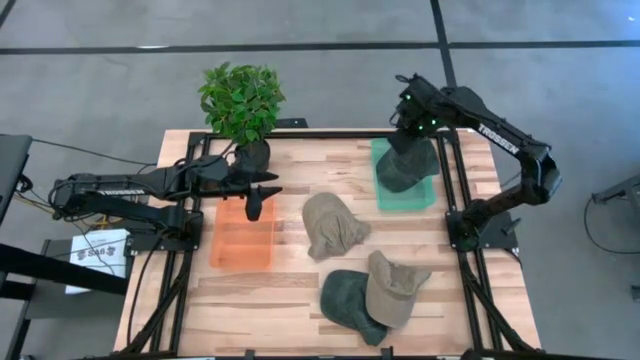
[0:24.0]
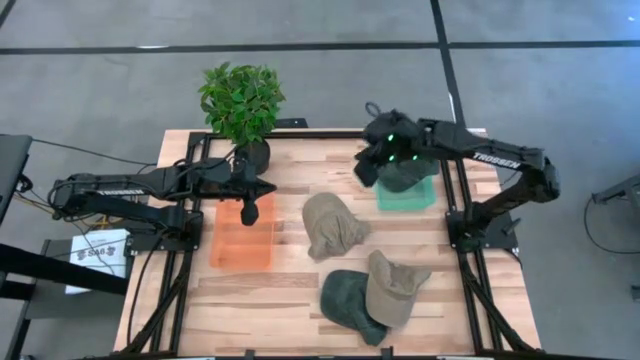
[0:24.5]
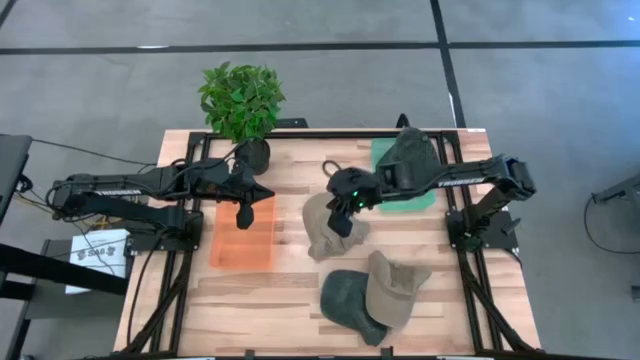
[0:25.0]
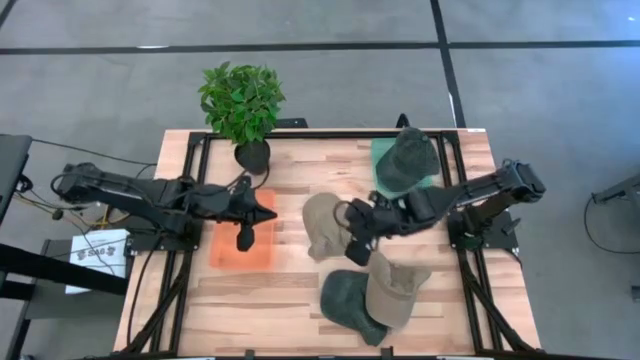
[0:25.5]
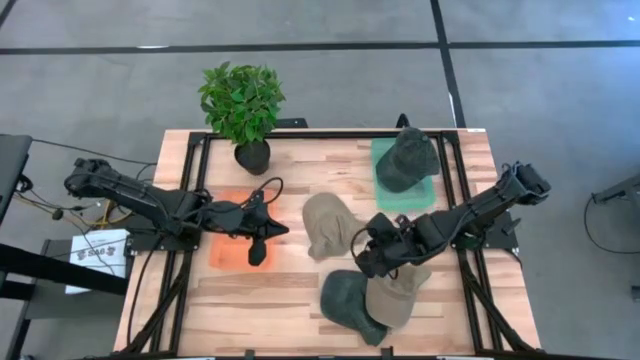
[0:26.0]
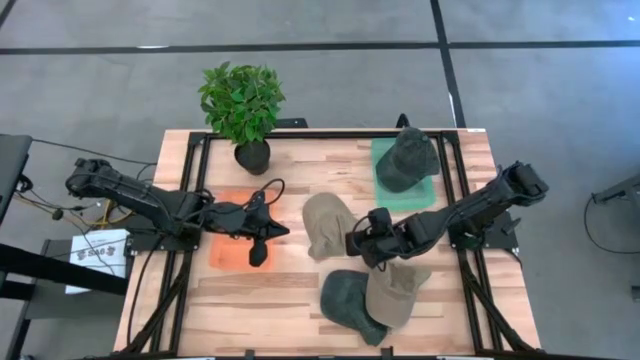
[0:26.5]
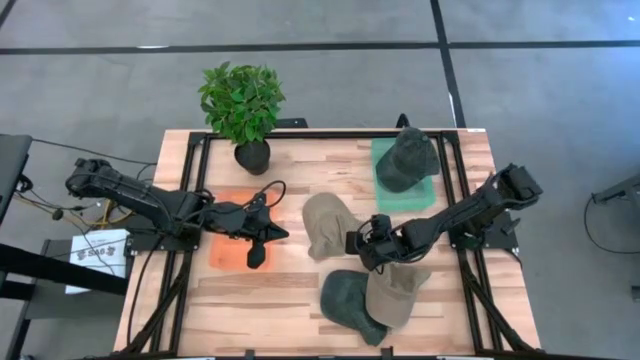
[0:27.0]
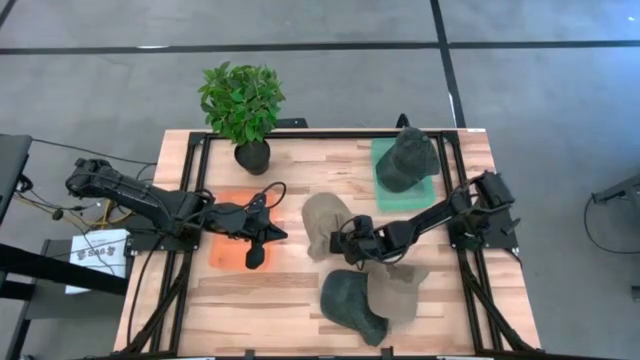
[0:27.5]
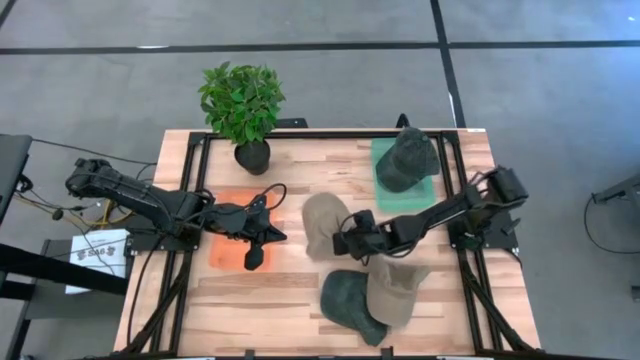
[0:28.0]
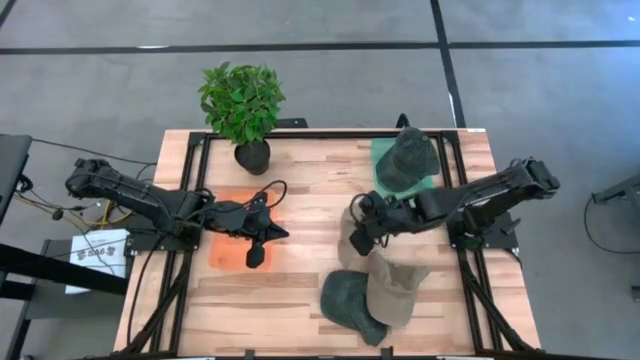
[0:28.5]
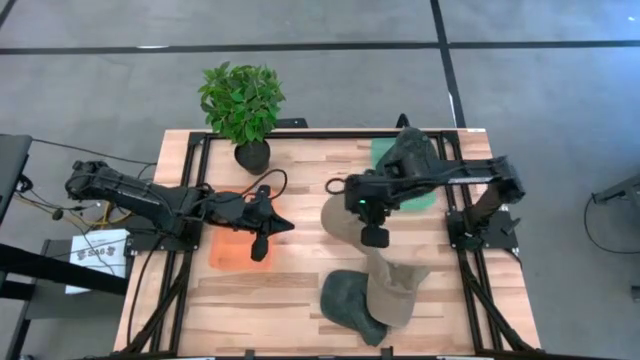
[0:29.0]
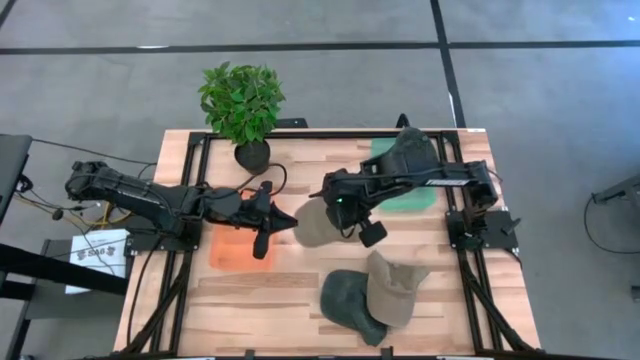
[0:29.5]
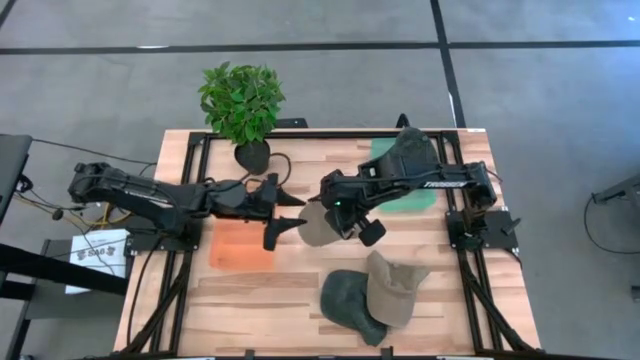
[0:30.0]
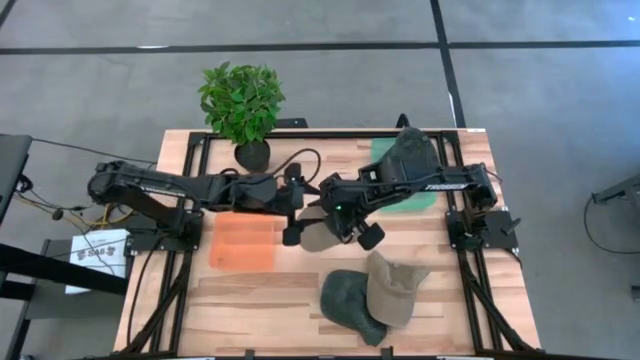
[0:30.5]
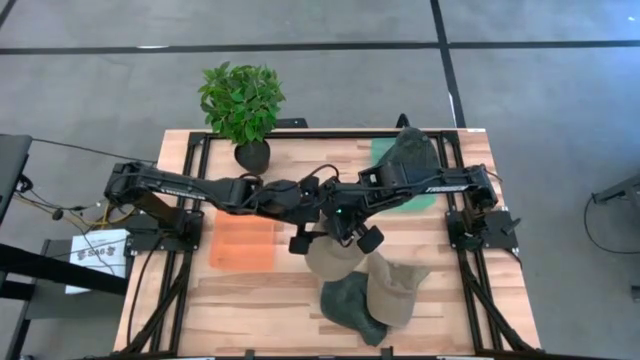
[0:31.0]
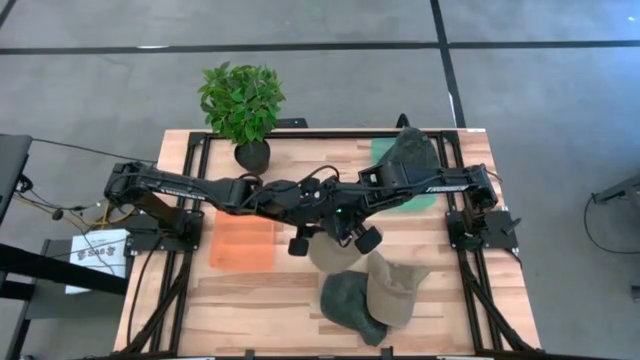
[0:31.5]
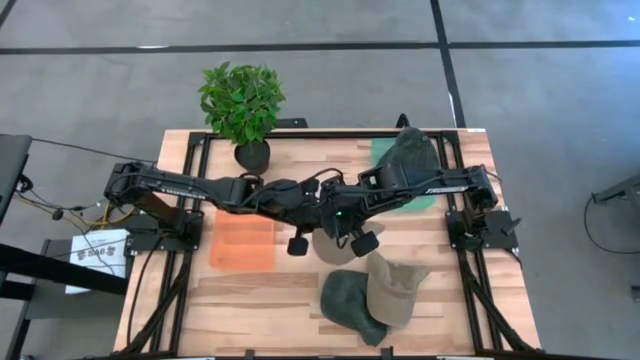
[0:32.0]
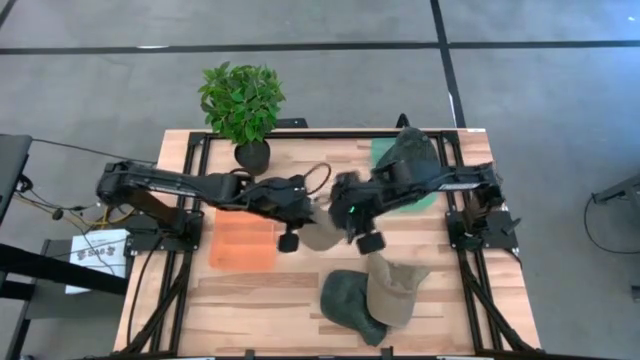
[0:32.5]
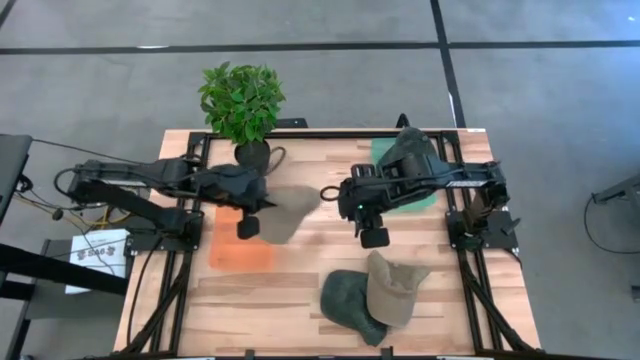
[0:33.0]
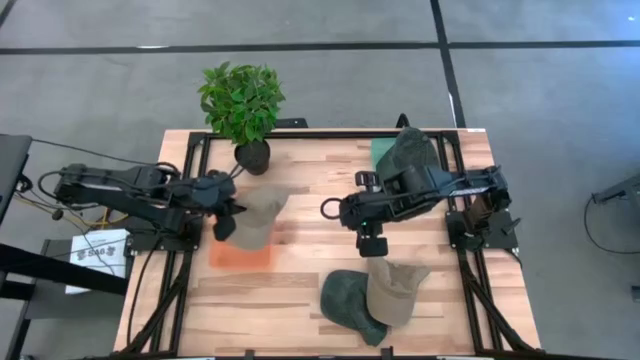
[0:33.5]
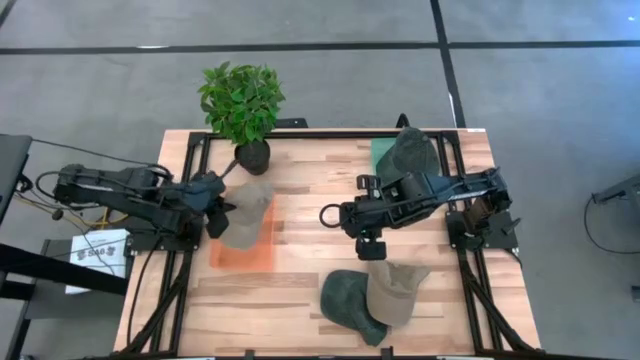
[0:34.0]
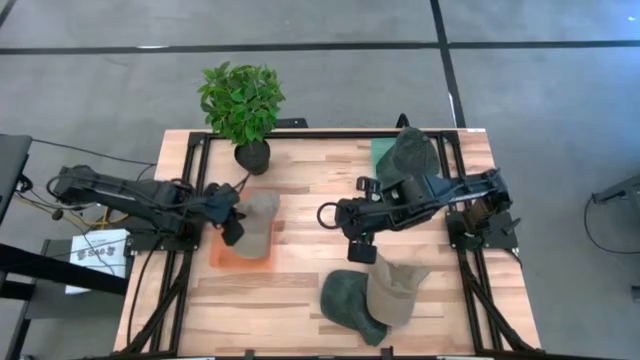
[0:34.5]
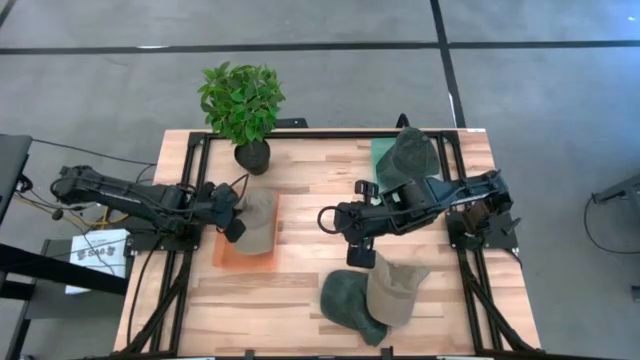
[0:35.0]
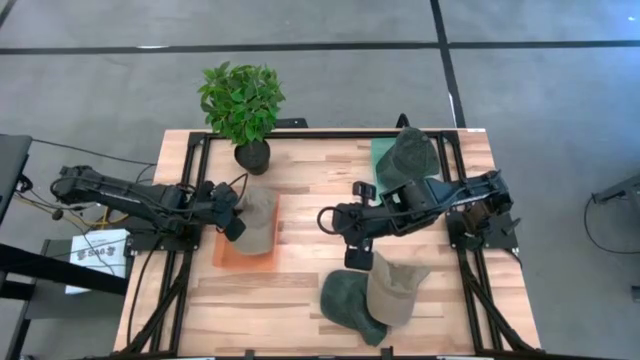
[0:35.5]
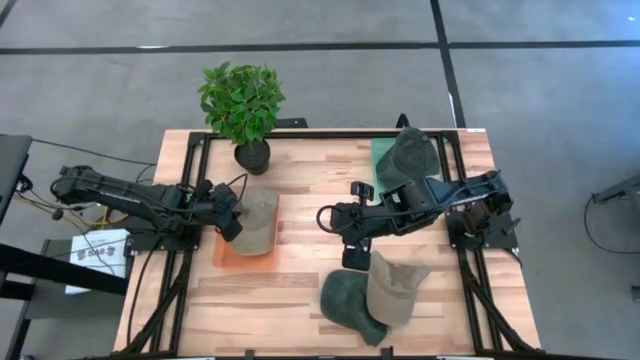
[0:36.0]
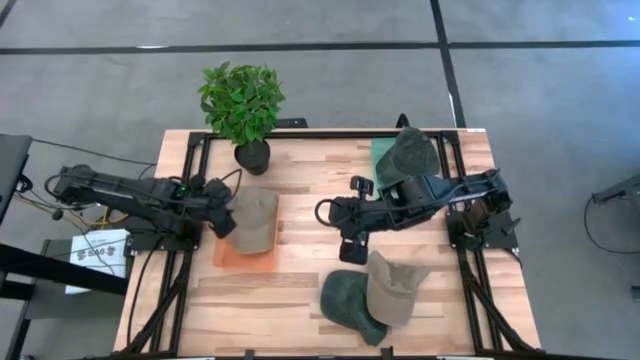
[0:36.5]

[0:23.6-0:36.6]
Task: Pick & Place hat
Put the top brown cap into the orange bin

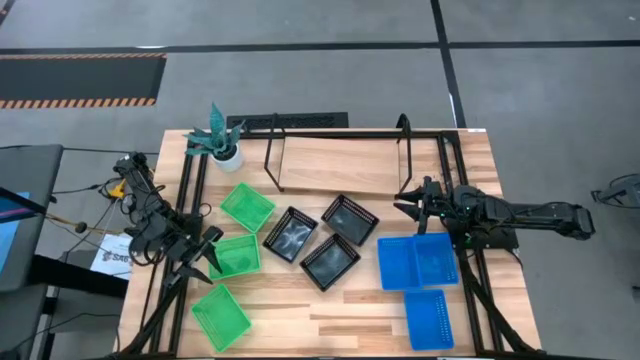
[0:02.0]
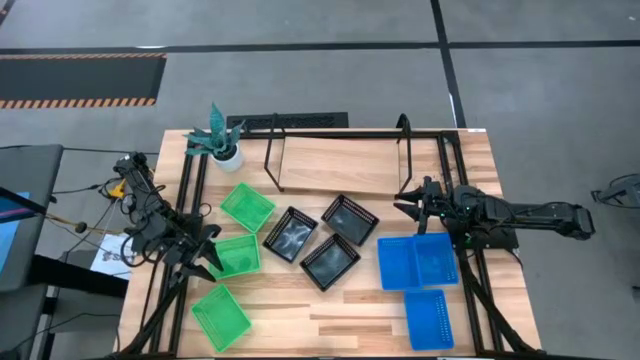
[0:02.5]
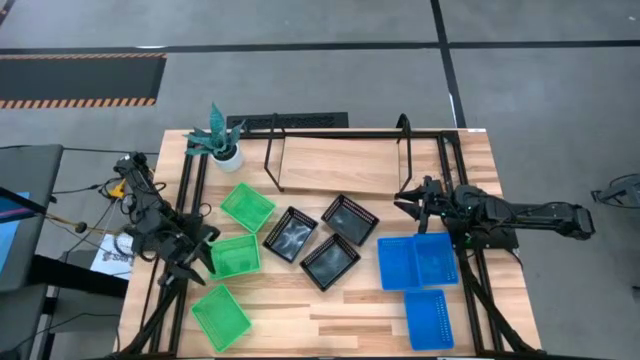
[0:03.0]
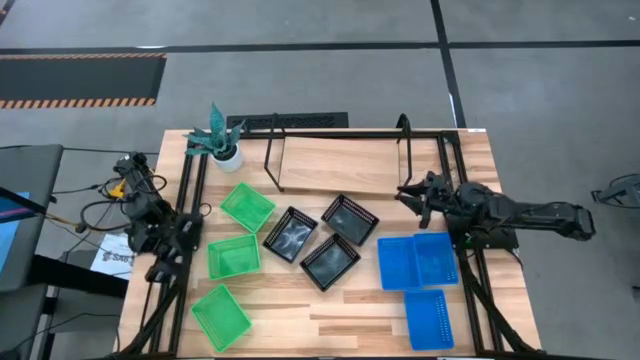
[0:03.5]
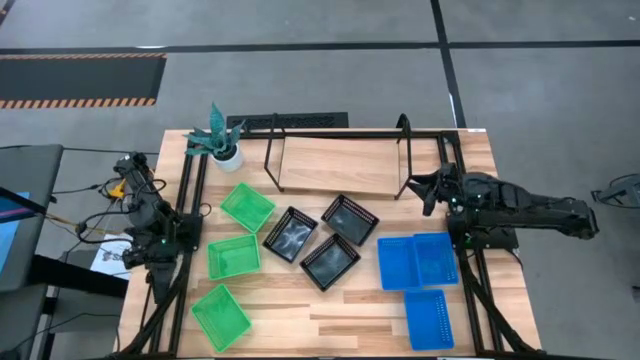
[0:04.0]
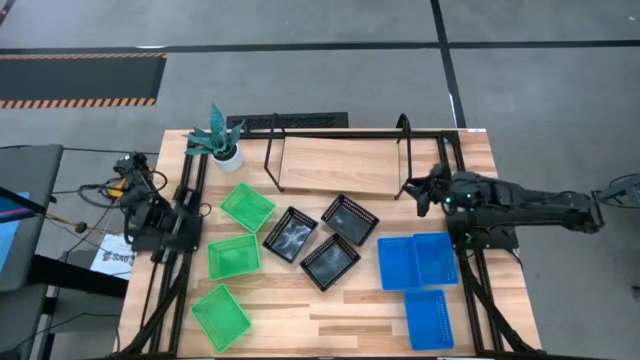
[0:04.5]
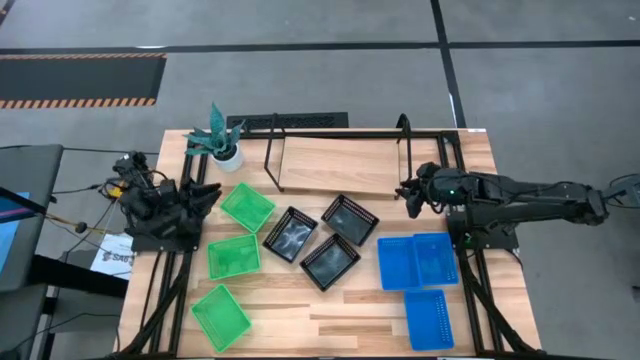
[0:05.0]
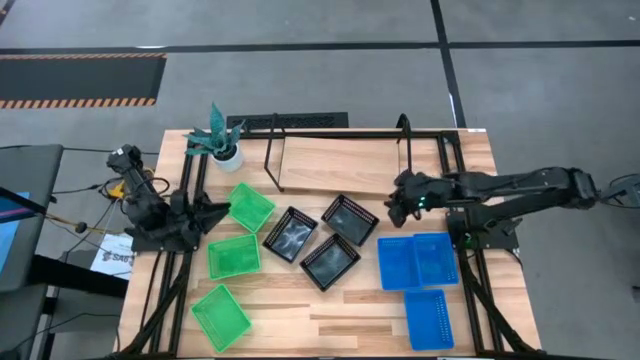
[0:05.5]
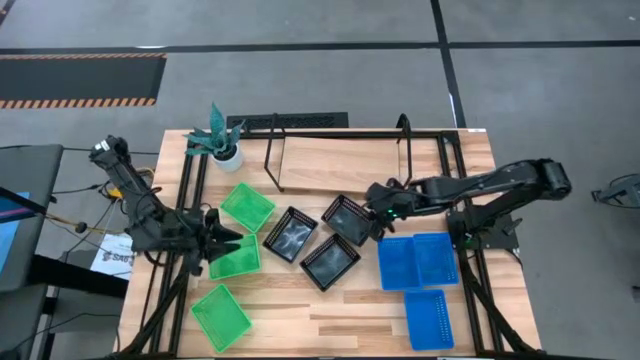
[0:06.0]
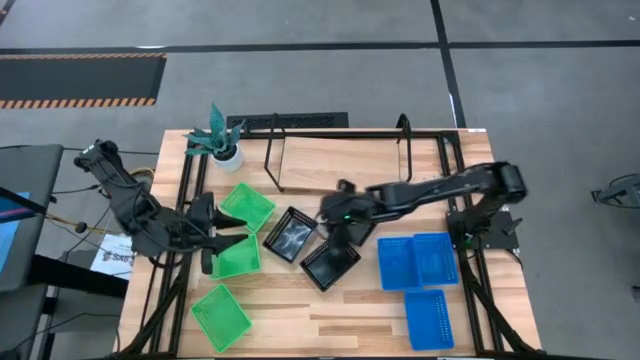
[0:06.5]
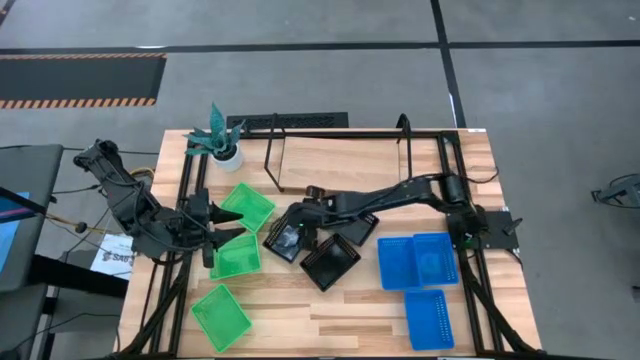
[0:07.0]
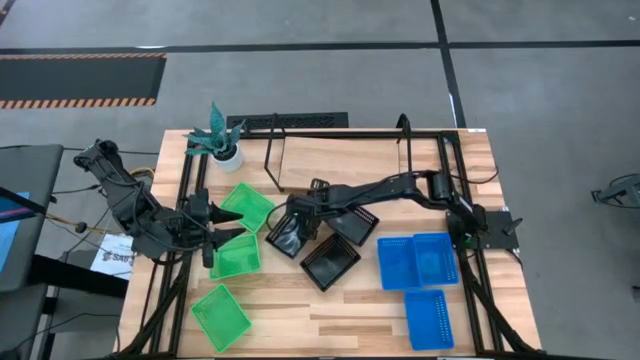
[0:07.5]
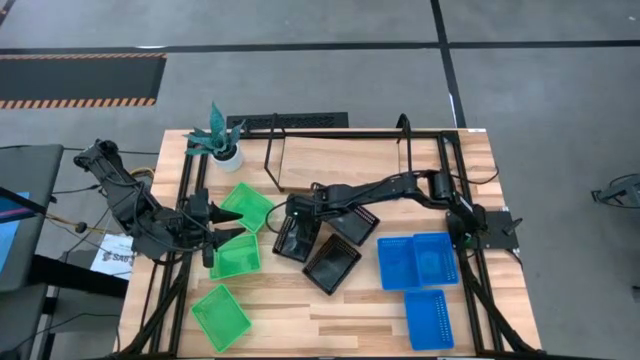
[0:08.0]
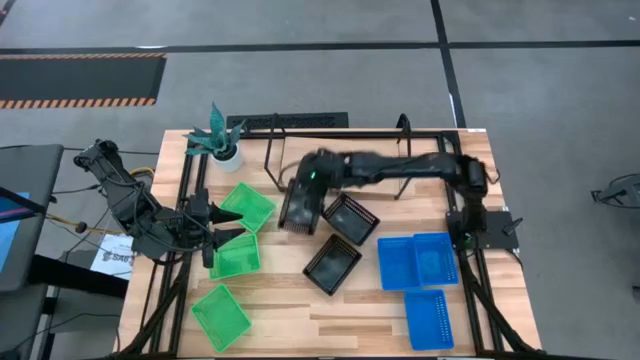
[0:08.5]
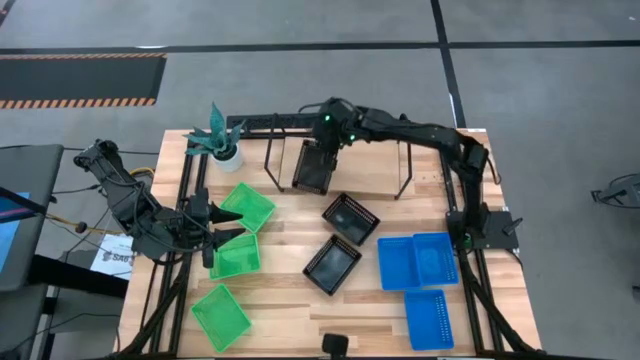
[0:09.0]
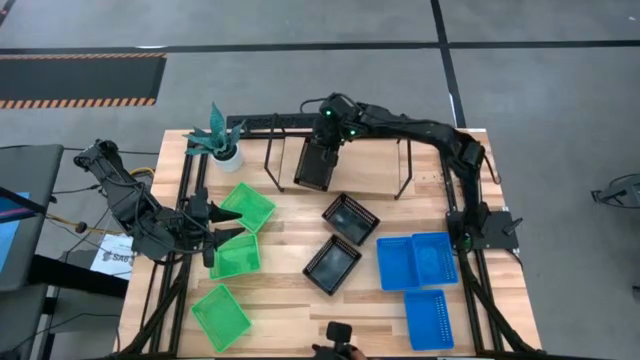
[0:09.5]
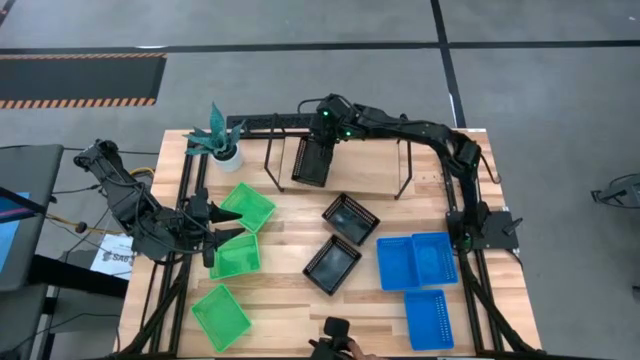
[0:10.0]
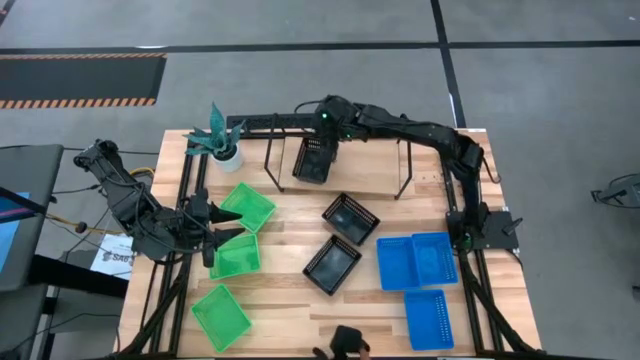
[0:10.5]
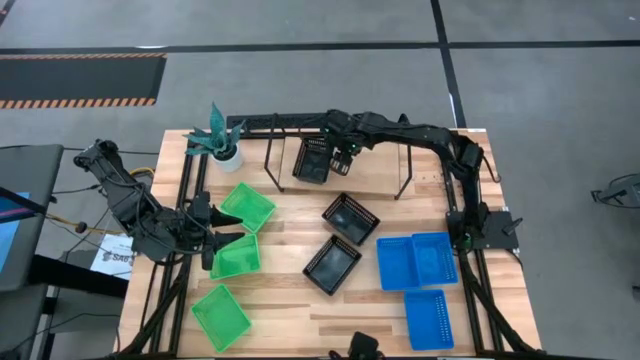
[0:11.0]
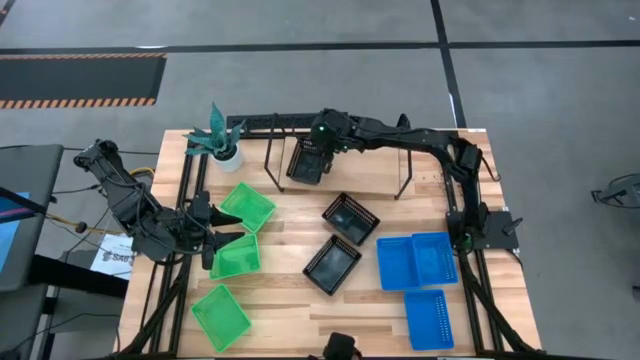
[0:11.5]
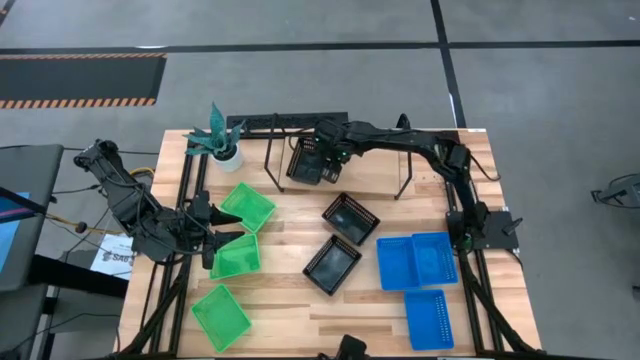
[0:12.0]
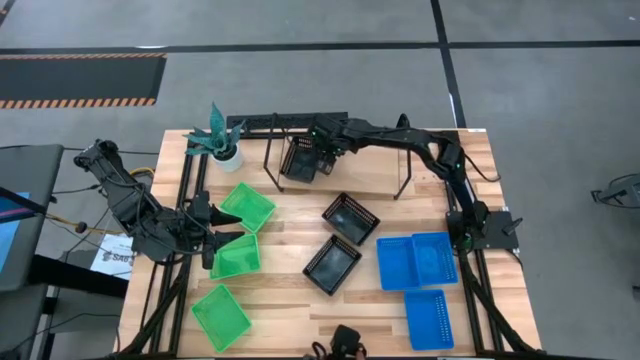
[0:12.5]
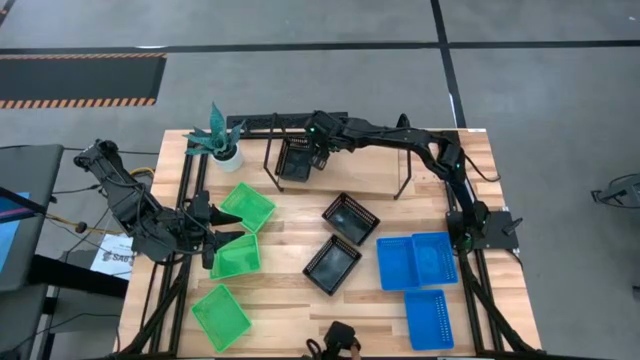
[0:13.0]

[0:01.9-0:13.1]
Task: Stack baskets on shelf by color
Put the left black basket on the shelf
